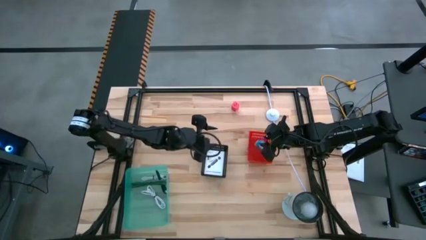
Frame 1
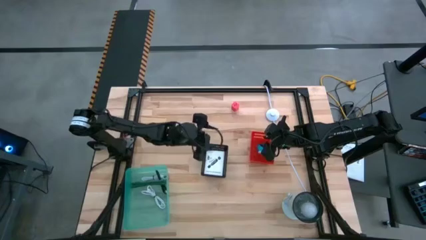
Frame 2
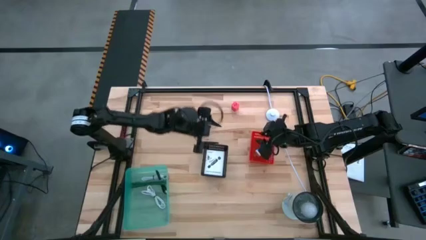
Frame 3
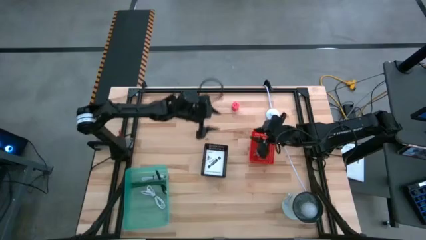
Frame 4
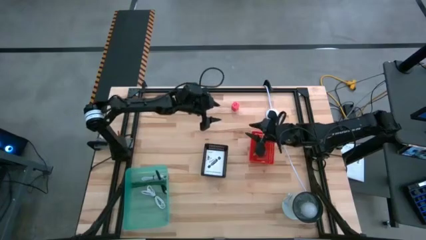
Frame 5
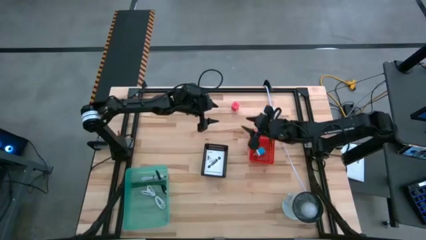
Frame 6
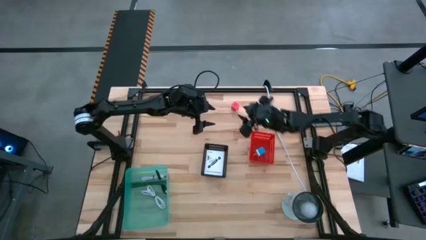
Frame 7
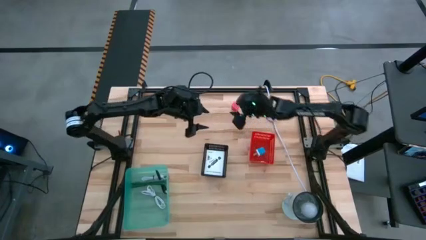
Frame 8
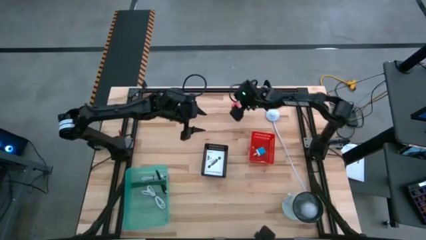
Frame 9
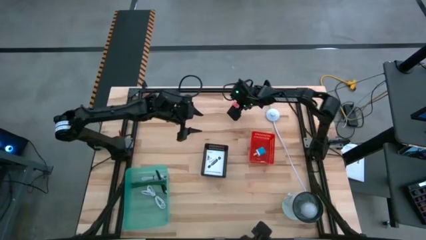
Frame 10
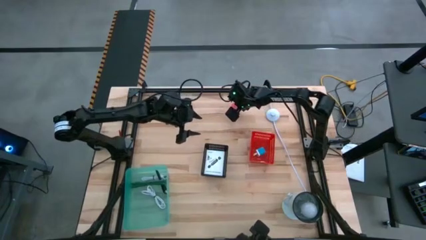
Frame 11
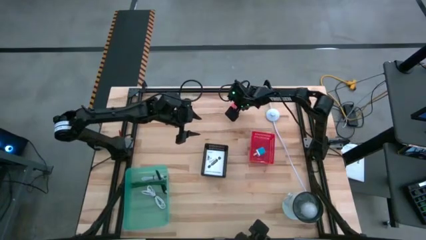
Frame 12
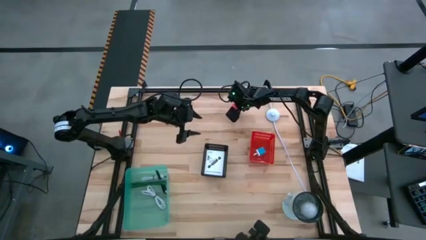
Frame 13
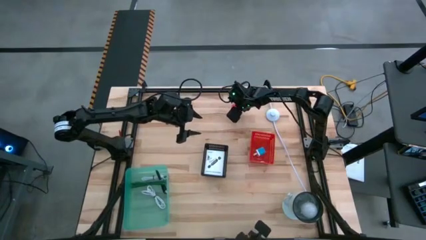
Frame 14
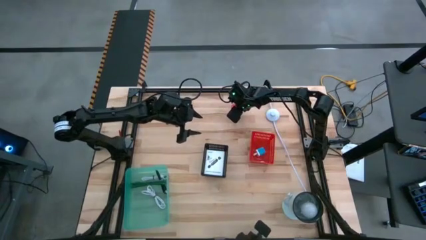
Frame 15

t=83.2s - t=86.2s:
Task: Pick and place items into bin
Put the pink charger adapter into the red bin

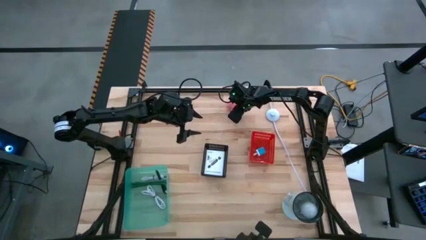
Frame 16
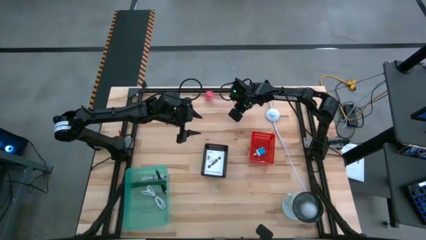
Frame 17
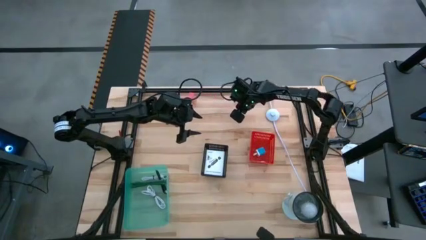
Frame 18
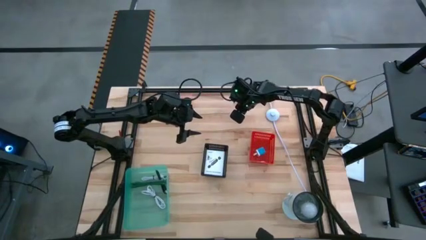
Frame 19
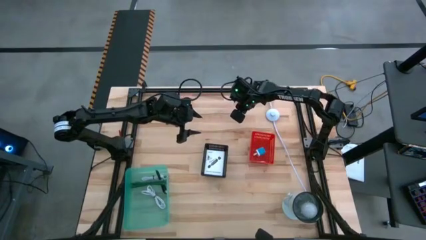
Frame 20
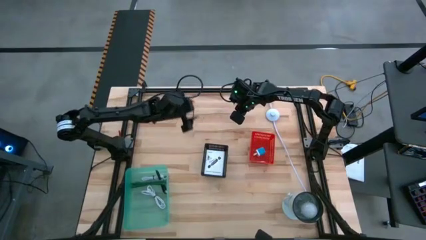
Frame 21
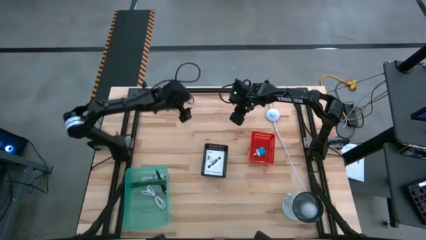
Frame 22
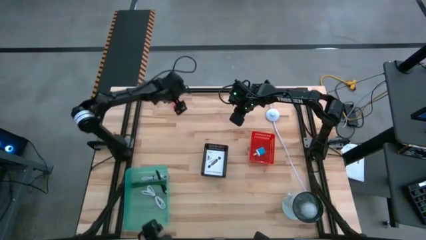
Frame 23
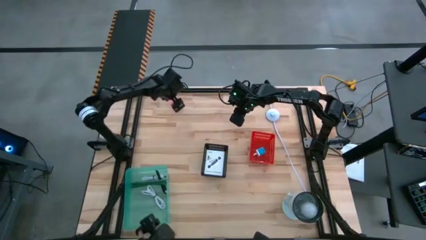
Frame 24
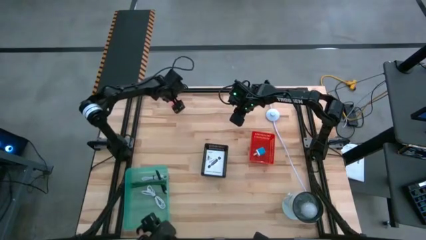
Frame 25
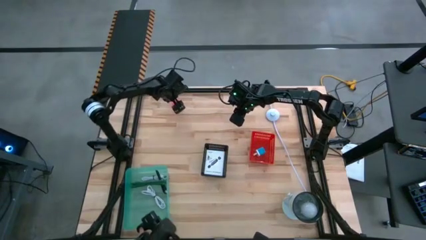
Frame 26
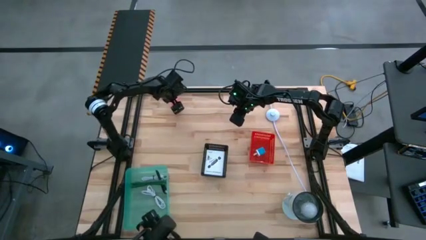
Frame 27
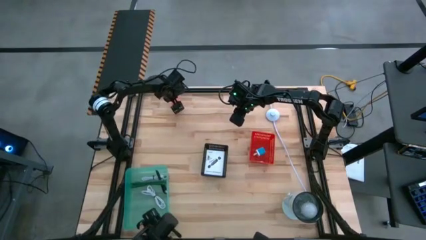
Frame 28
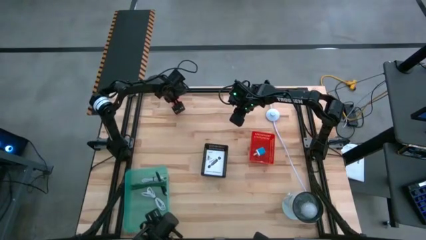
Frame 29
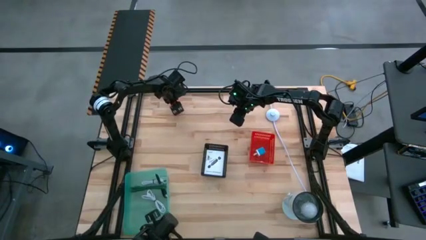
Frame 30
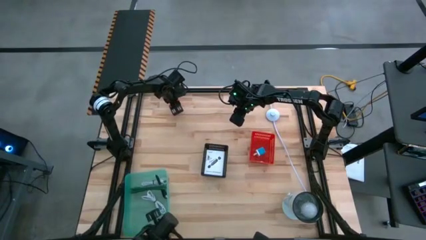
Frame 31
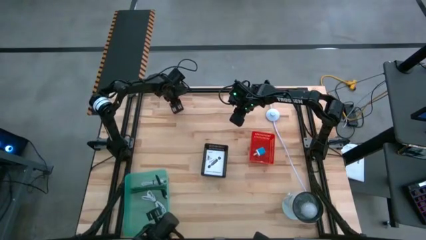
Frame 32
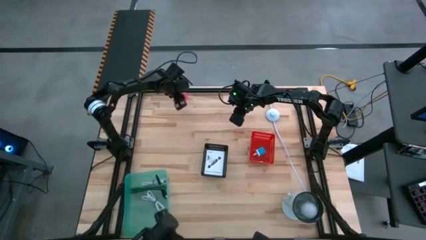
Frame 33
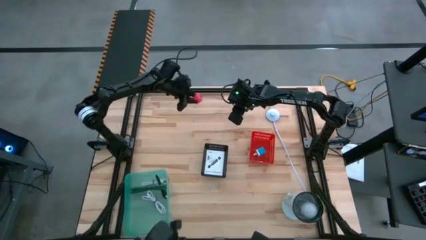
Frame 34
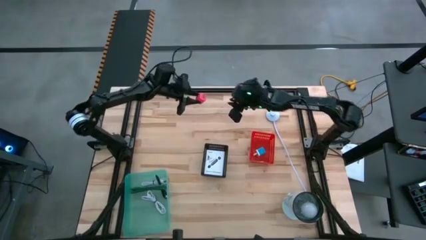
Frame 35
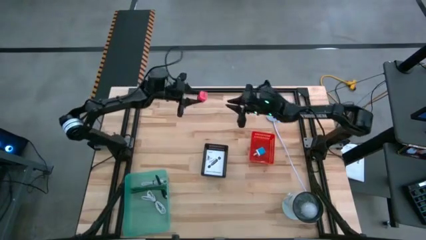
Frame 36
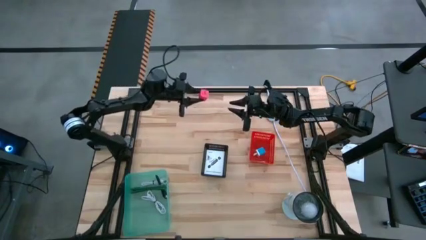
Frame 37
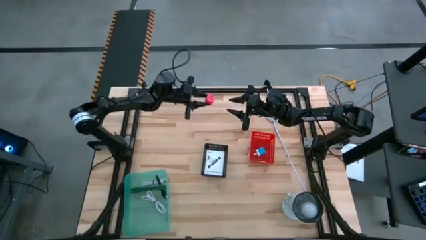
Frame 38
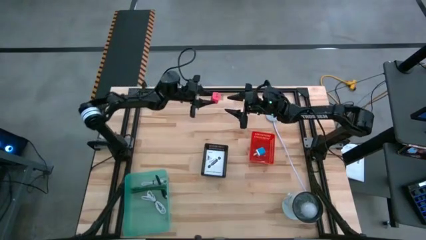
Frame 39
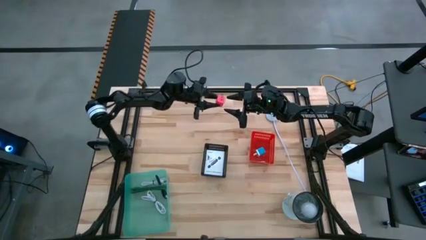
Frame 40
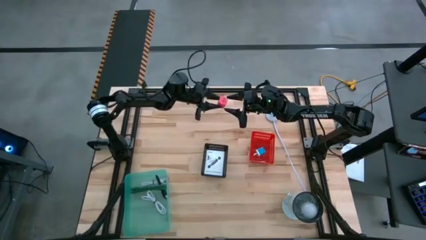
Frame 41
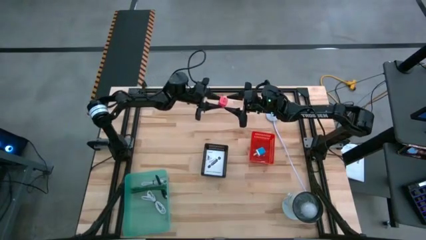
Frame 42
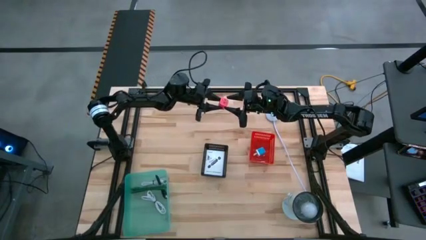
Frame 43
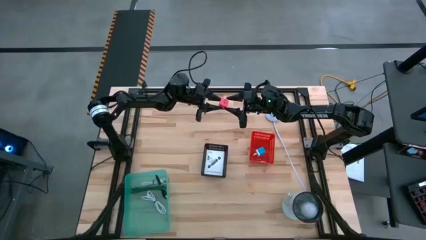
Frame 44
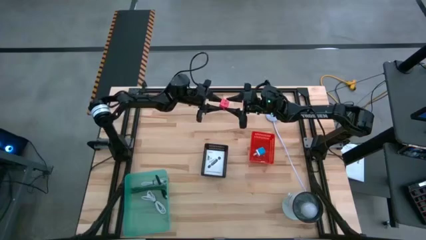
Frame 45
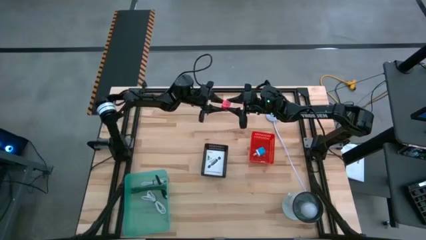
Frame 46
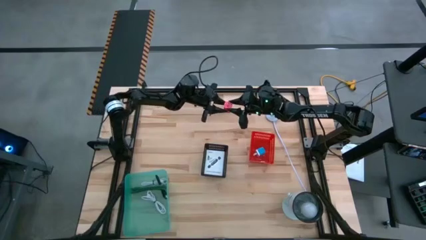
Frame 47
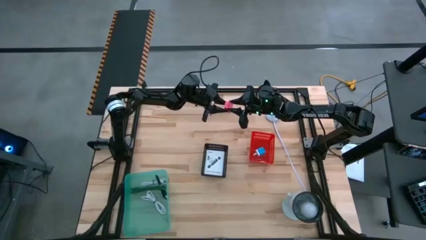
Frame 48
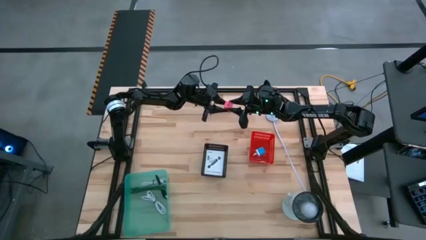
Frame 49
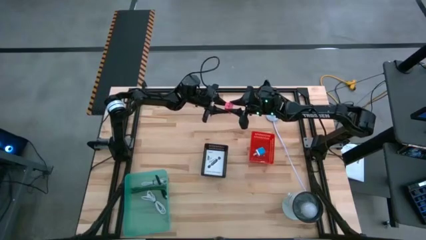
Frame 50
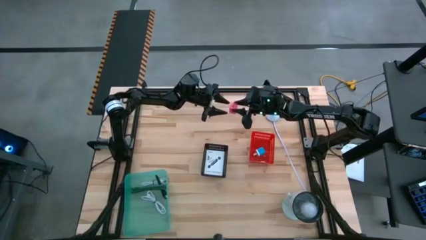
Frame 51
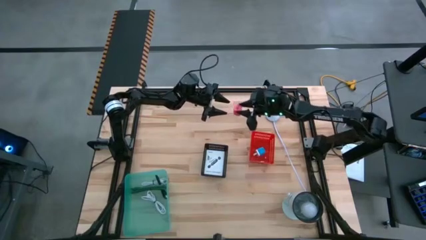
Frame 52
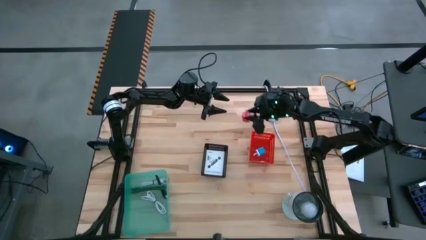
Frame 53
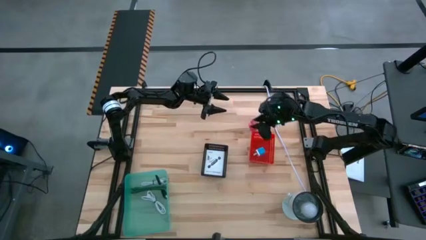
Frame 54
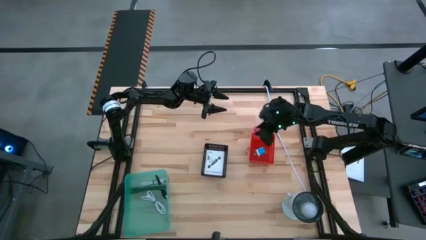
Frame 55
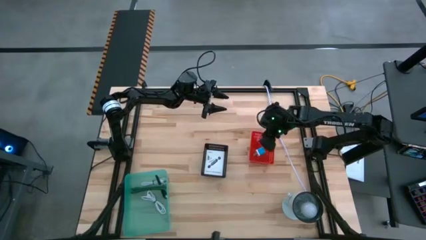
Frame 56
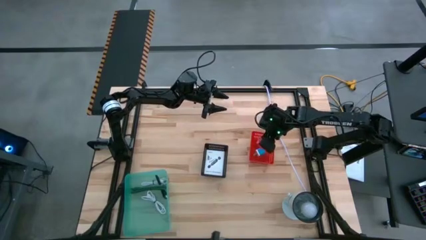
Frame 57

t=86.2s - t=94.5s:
Put the pink charger adapter into the red bin
